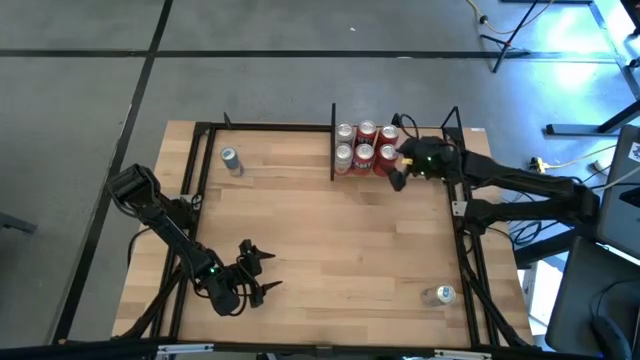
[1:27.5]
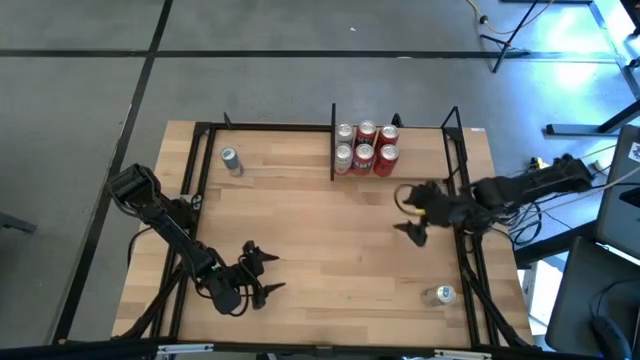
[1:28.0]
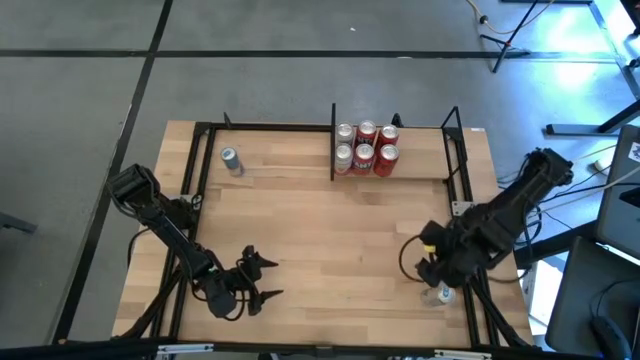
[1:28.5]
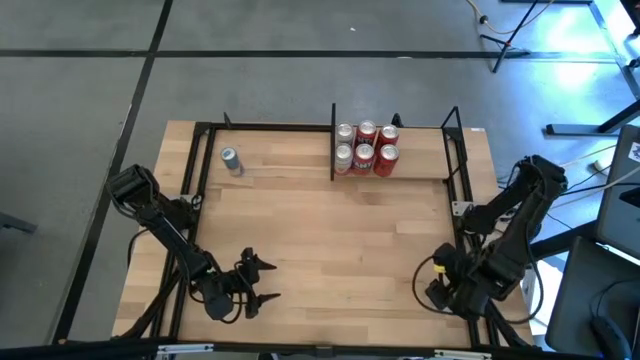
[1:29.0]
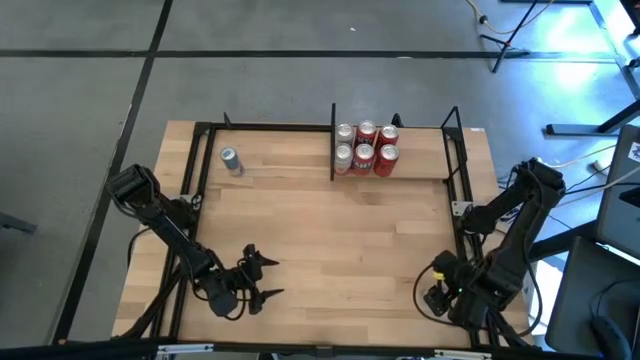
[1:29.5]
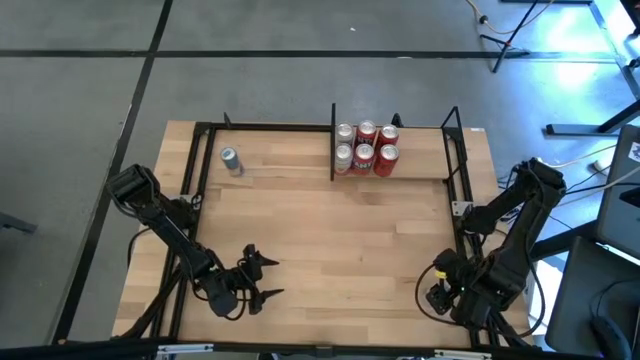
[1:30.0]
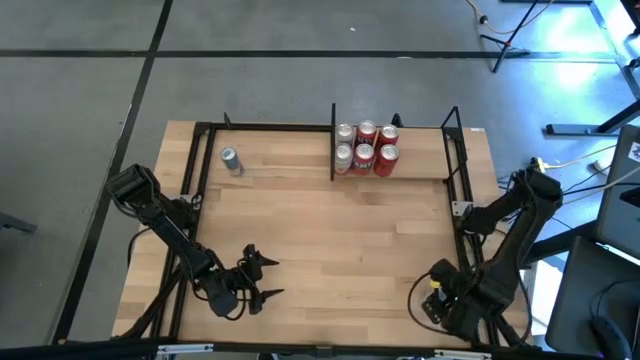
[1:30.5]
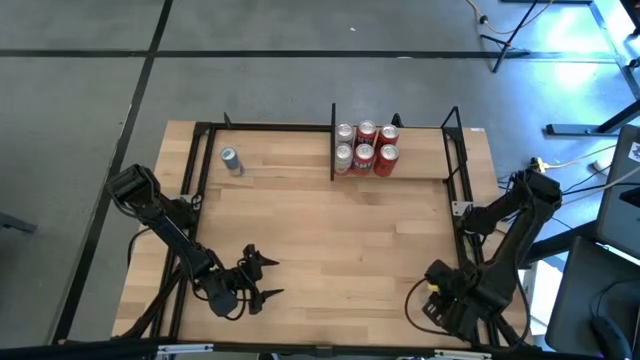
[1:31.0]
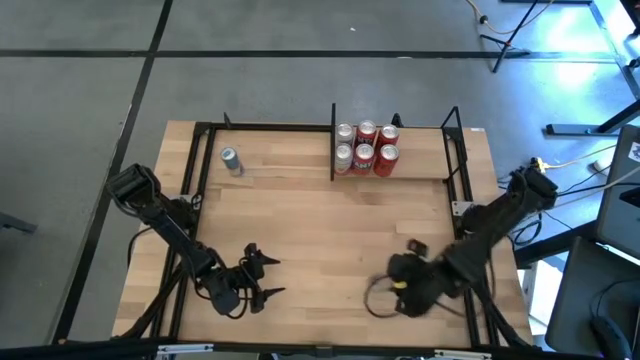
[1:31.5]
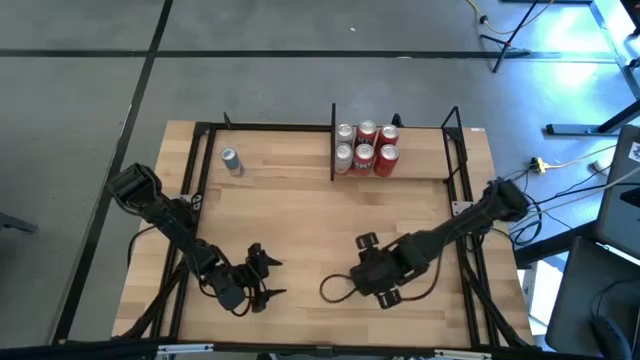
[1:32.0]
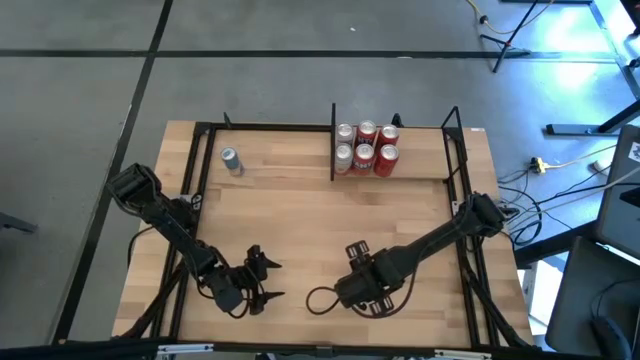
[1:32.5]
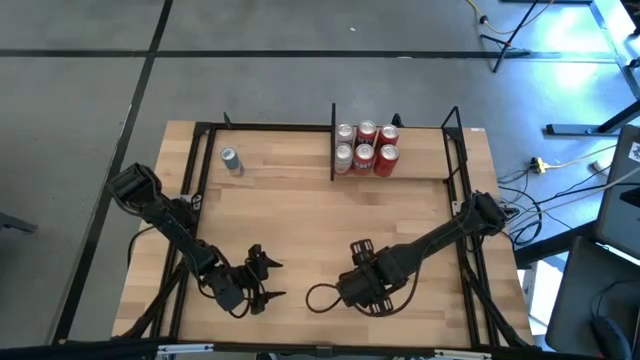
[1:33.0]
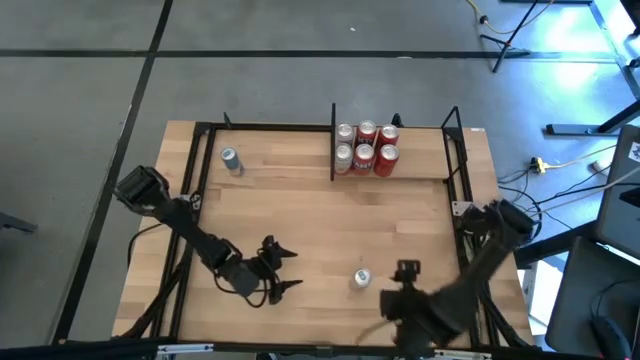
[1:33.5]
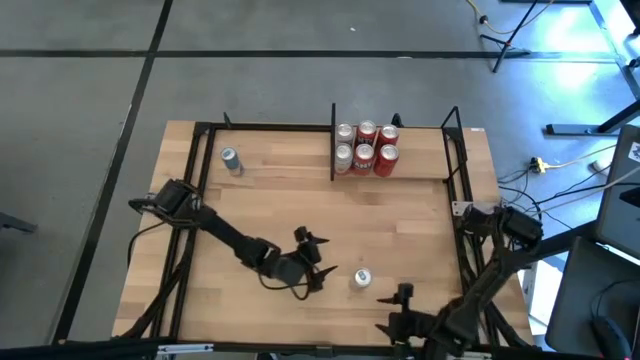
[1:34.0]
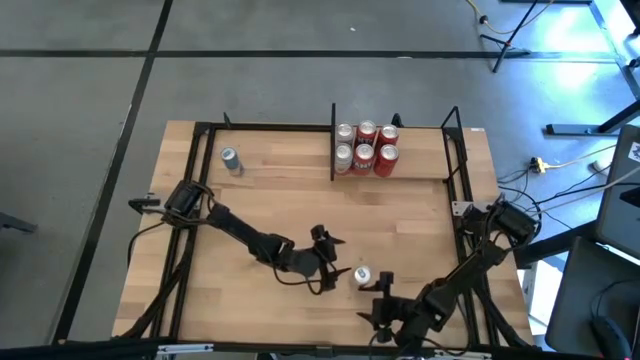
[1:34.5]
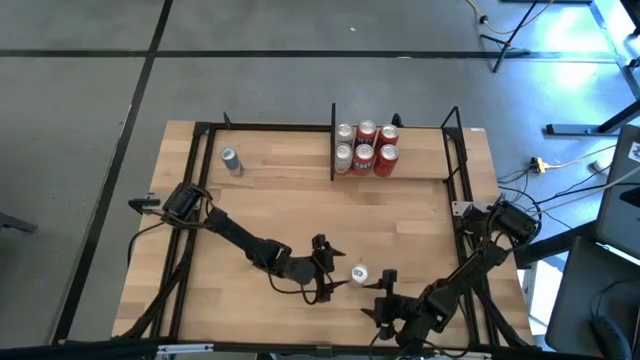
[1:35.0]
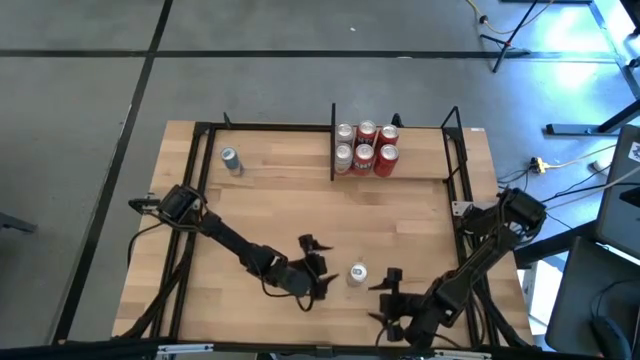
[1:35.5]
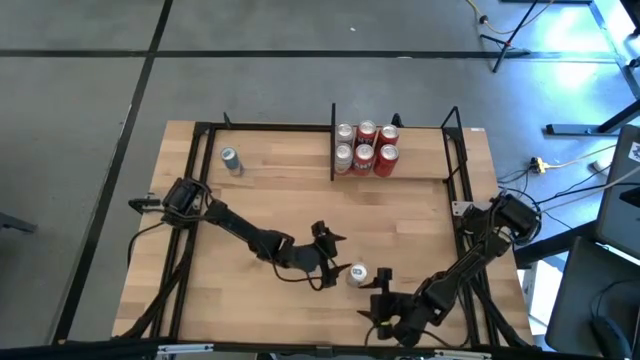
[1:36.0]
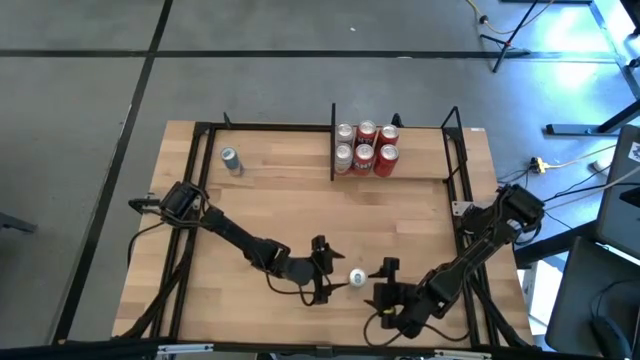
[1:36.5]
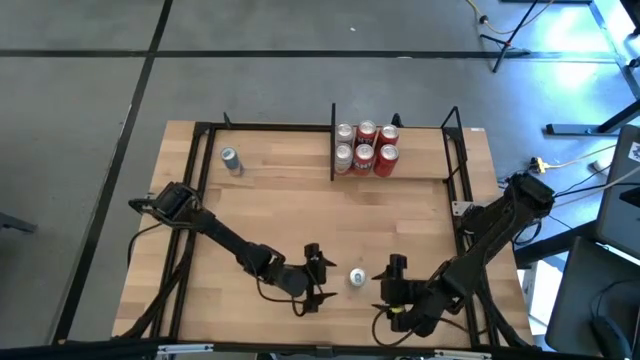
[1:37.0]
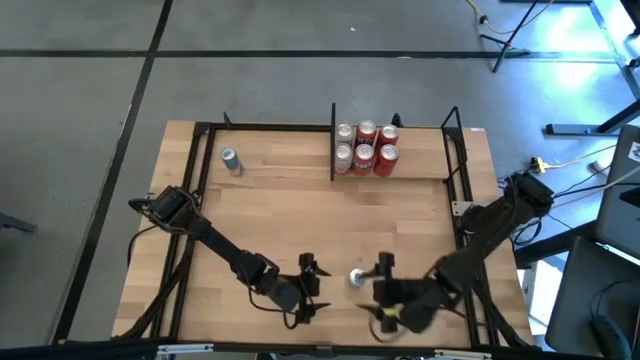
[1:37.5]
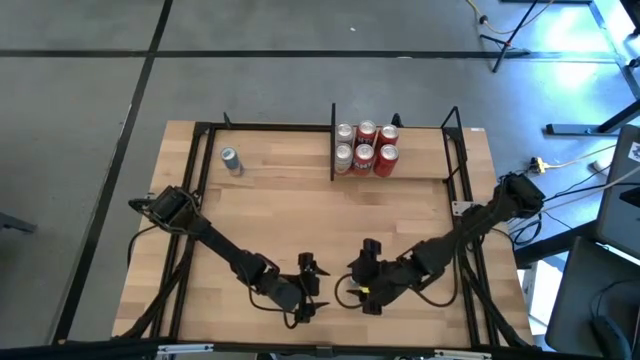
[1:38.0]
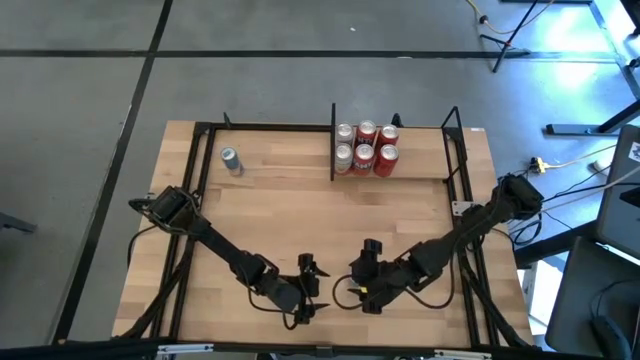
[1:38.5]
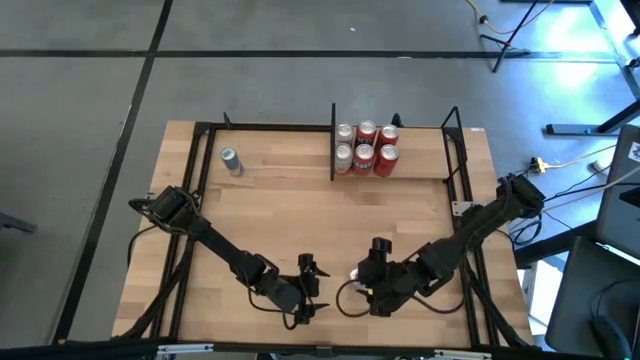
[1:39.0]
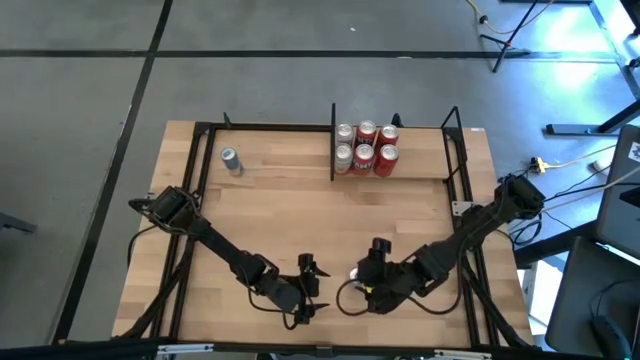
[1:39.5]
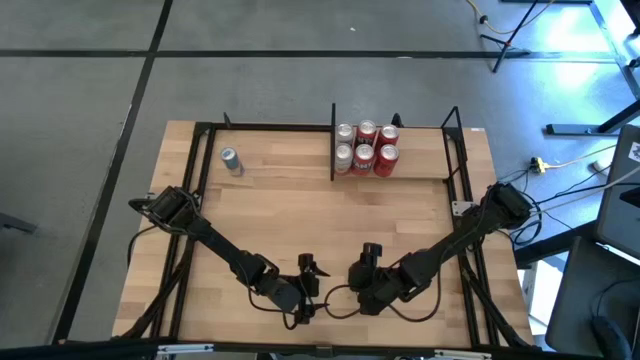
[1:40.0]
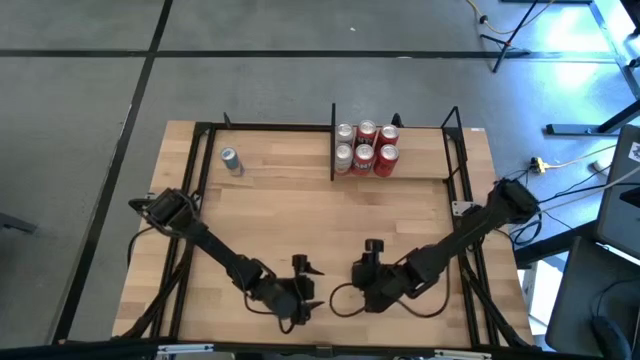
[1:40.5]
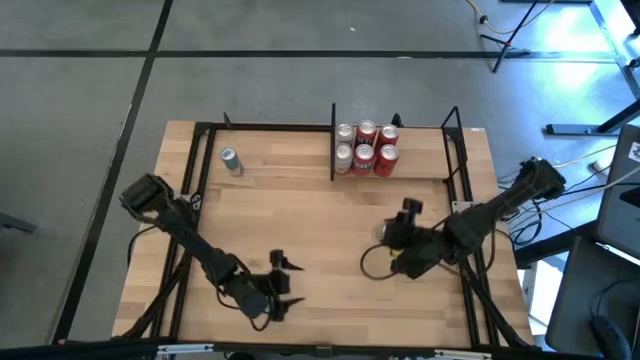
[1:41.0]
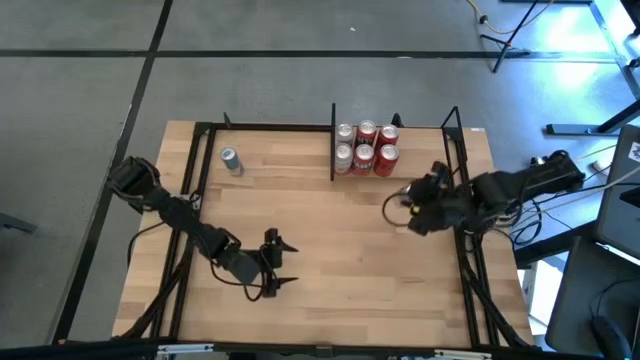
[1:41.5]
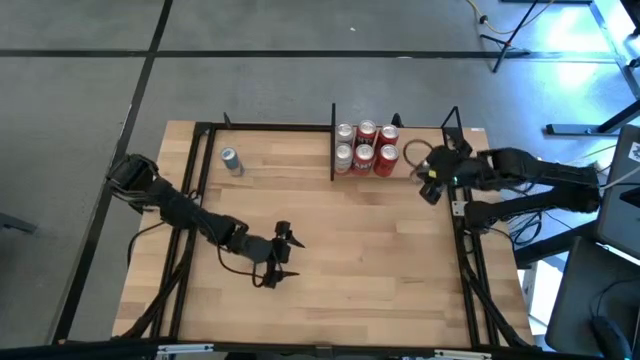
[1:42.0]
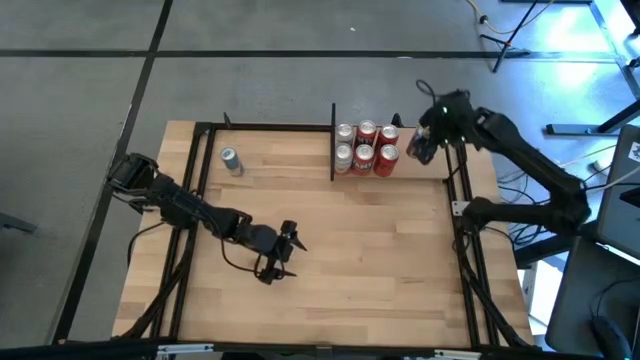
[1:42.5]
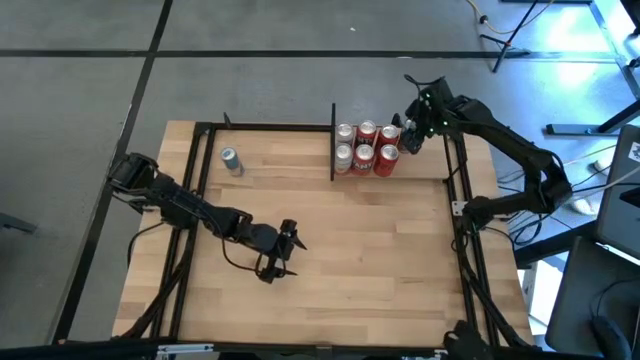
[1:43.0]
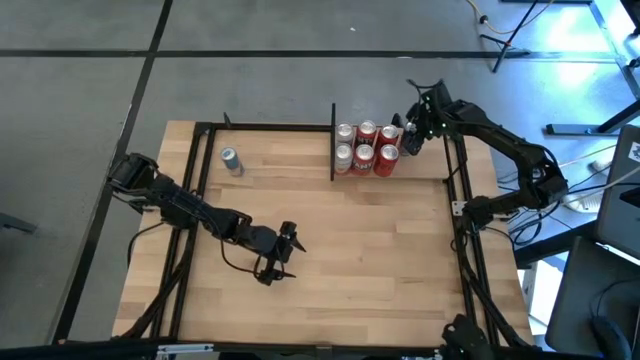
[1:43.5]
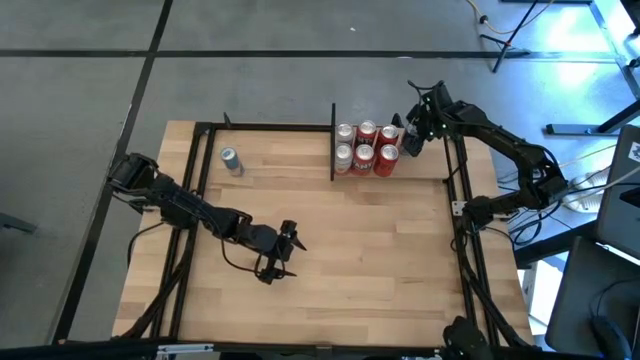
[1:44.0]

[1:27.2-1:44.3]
Task: Place canned beverage on shelf
Put the bottom blue soda can on the shelf

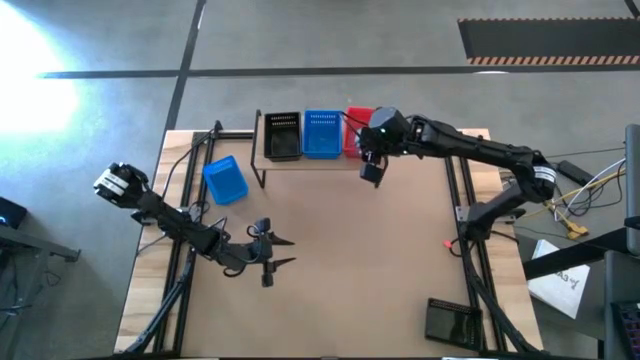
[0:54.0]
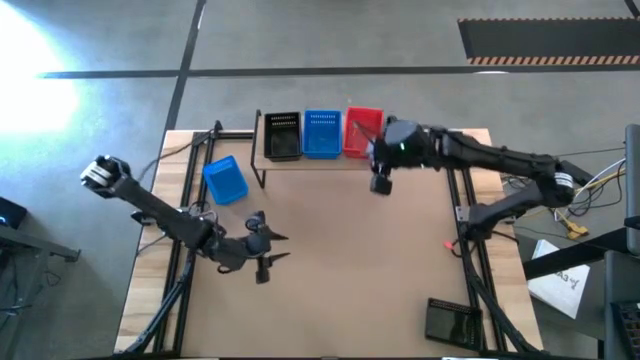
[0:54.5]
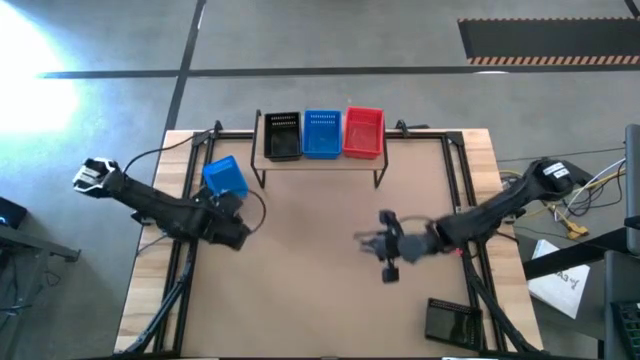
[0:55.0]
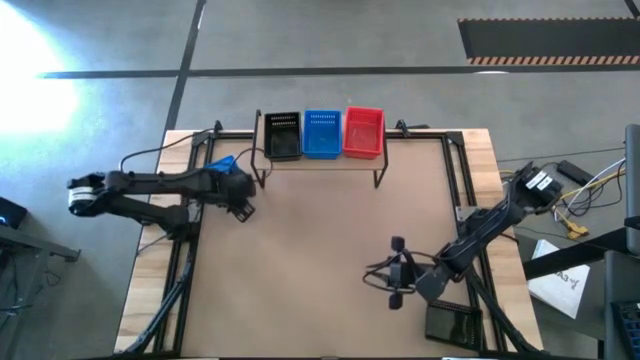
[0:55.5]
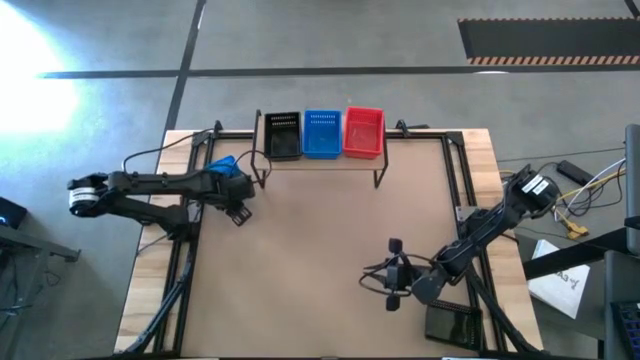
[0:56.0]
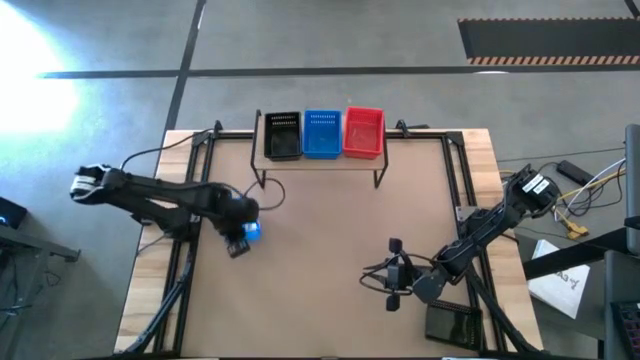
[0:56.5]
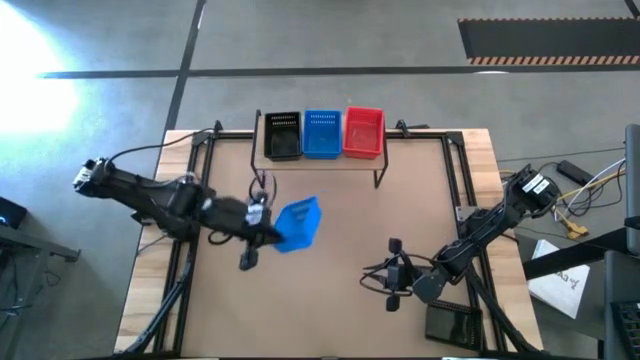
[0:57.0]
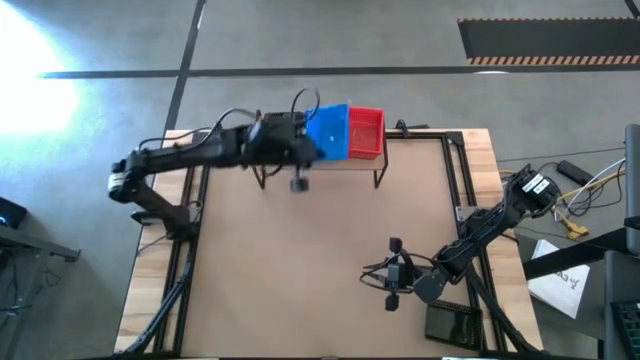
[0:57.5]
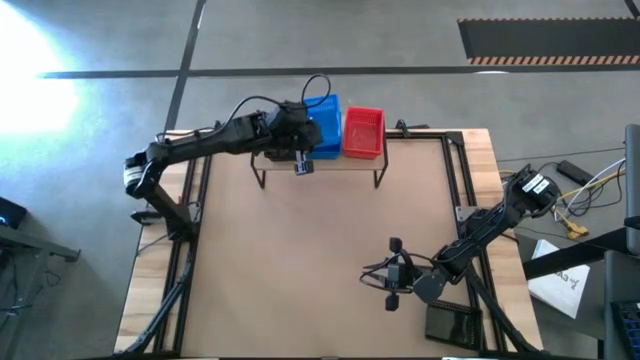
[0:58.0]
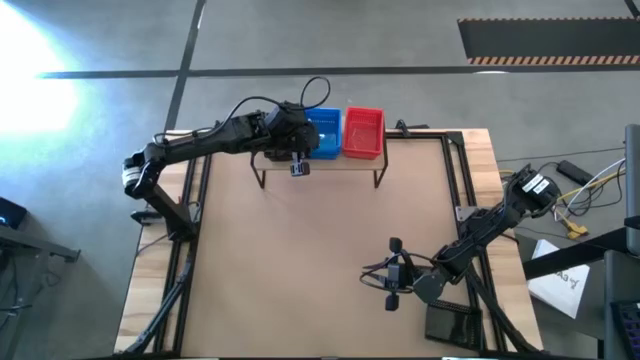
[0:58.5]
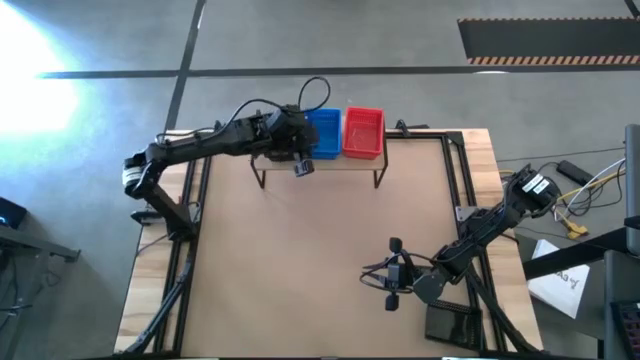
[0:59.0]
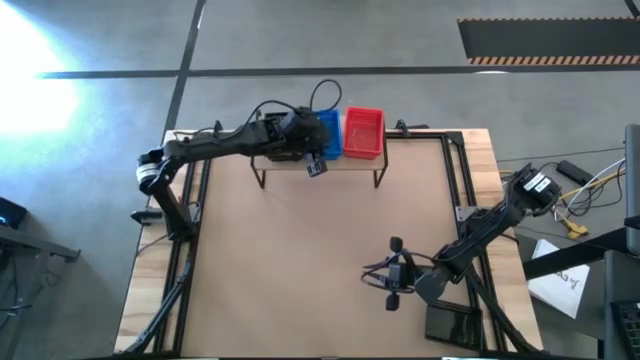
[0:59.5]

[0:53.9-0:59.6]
Task: Stack baskets on shelf by color
Stack the blue bin on the blue bins on the shelf
